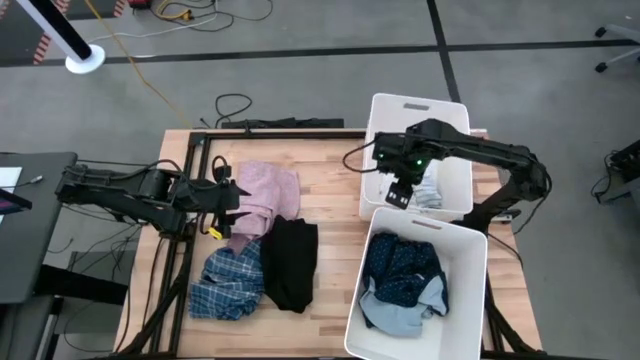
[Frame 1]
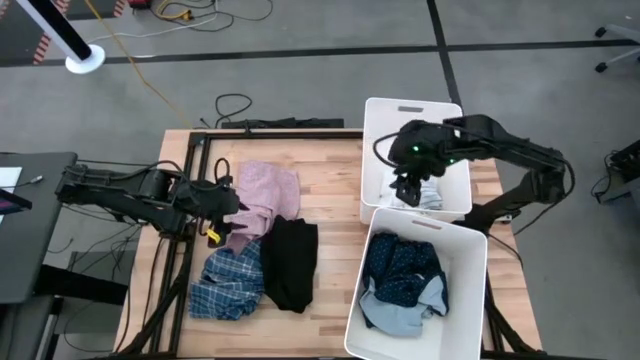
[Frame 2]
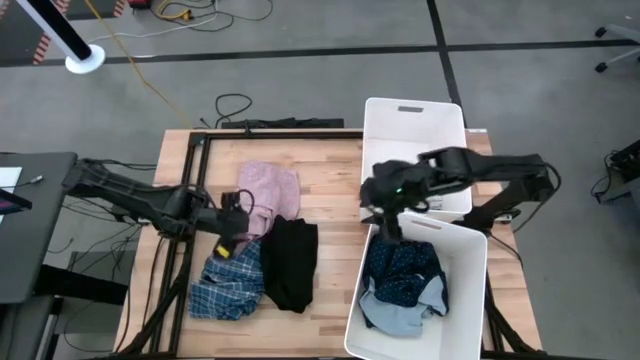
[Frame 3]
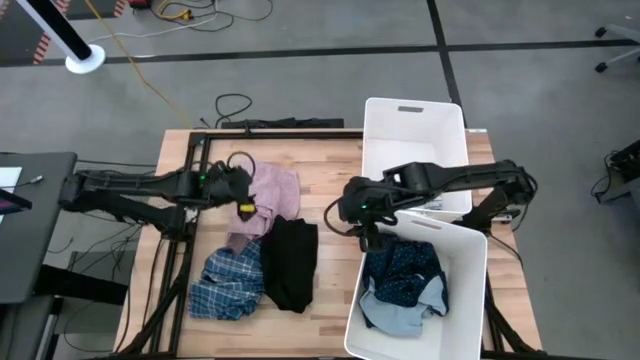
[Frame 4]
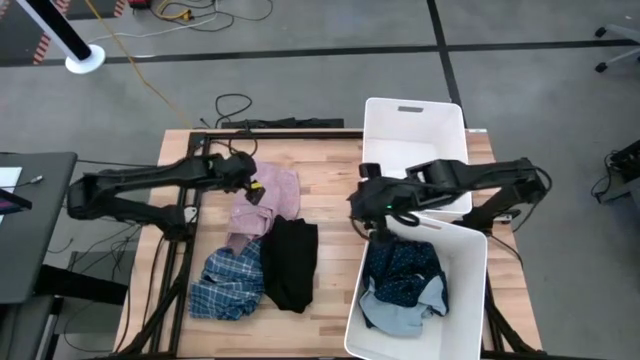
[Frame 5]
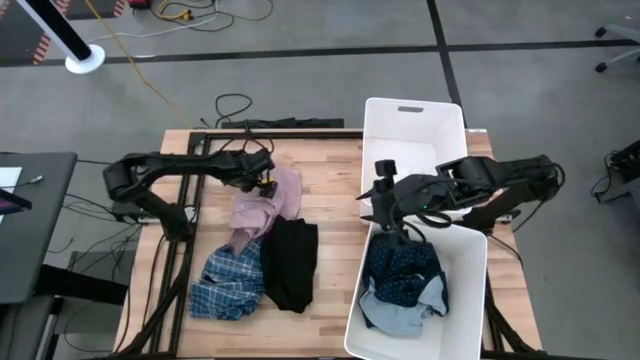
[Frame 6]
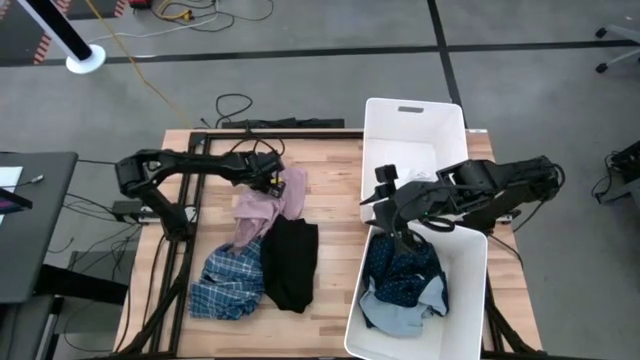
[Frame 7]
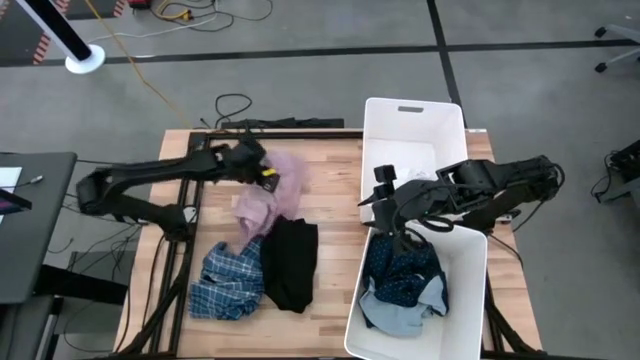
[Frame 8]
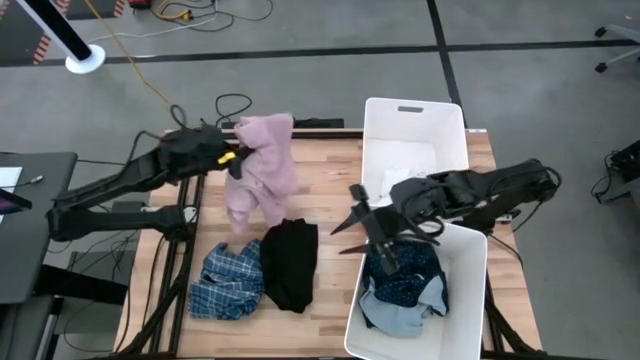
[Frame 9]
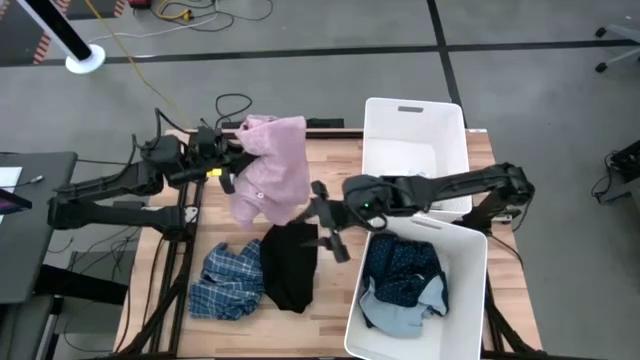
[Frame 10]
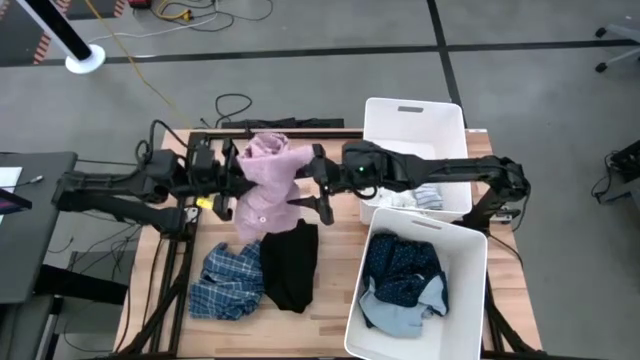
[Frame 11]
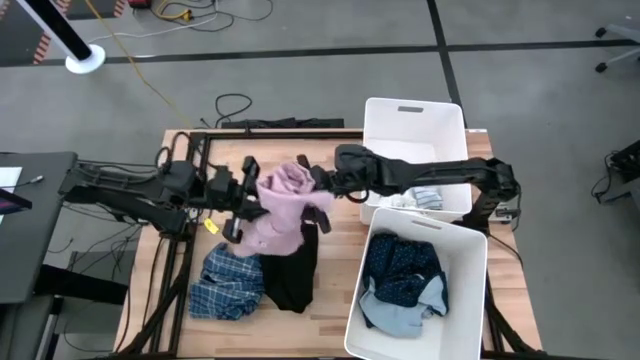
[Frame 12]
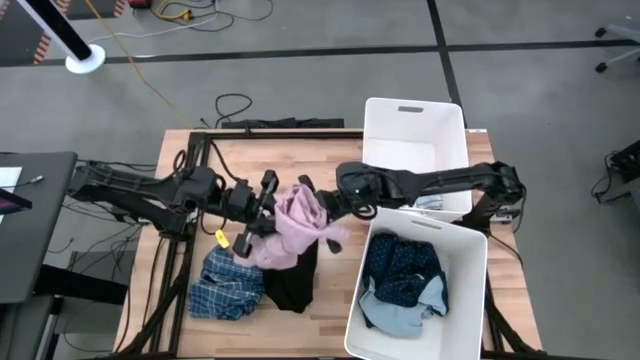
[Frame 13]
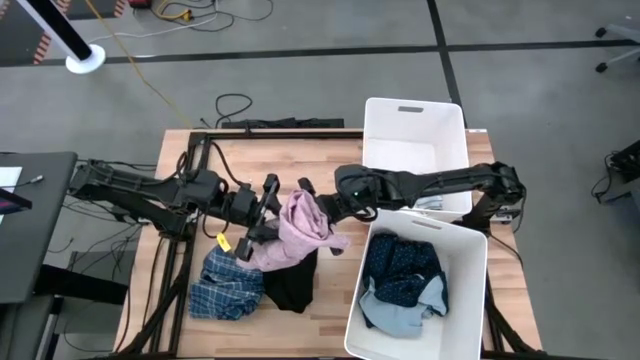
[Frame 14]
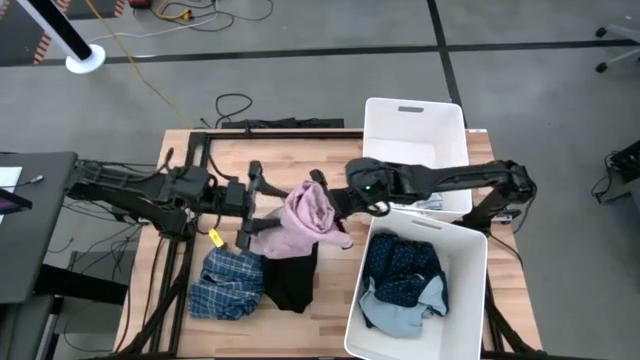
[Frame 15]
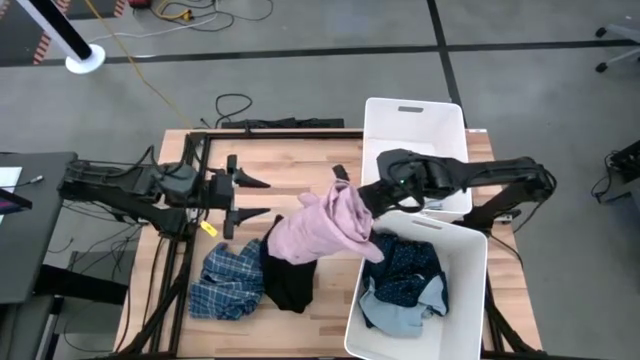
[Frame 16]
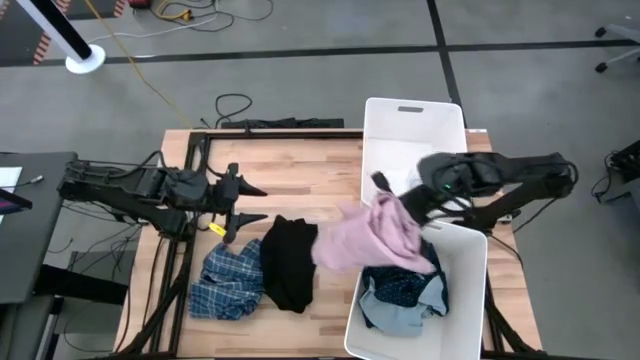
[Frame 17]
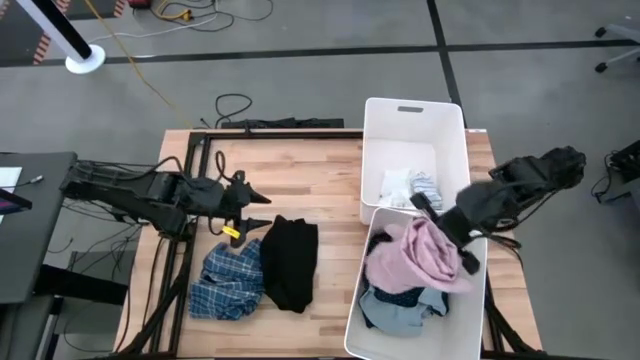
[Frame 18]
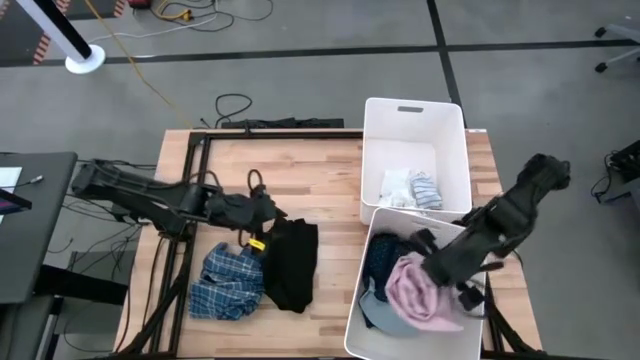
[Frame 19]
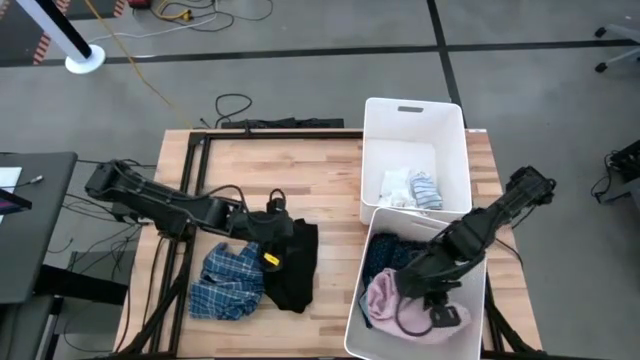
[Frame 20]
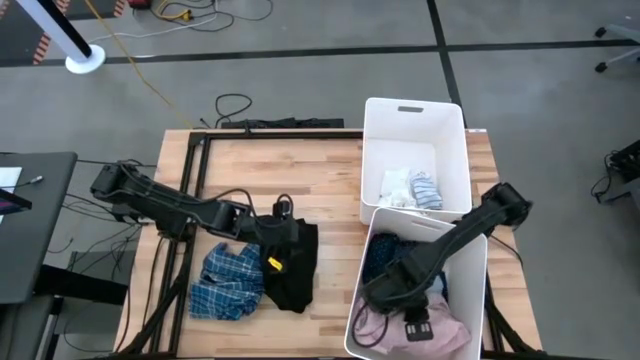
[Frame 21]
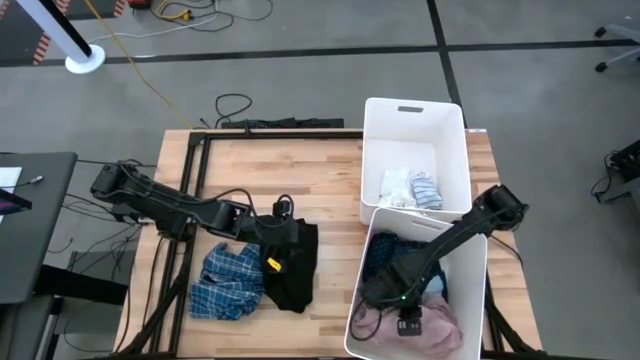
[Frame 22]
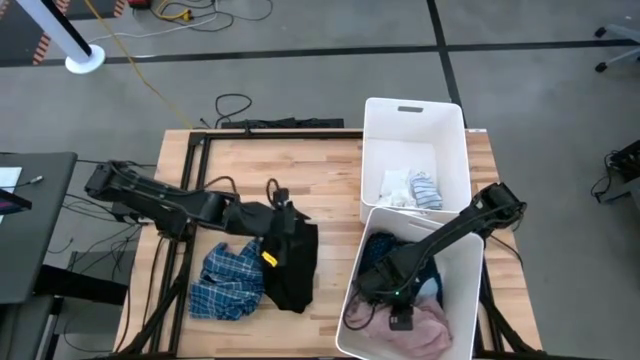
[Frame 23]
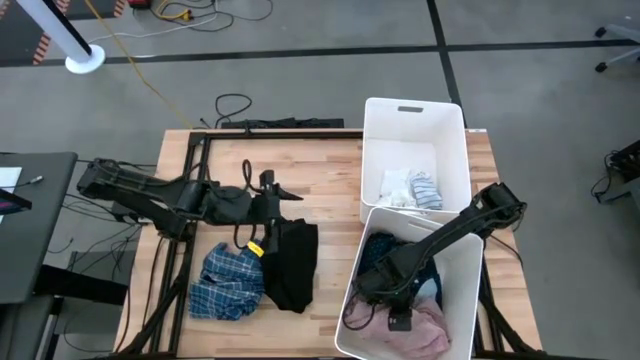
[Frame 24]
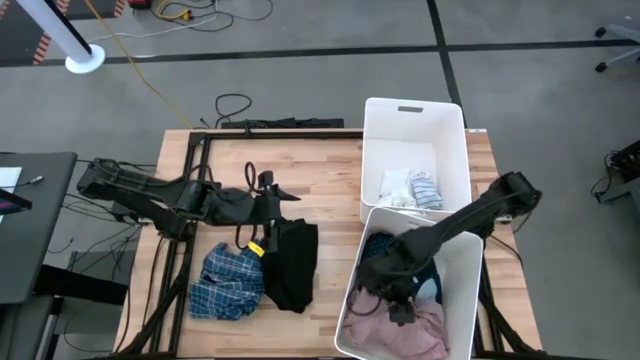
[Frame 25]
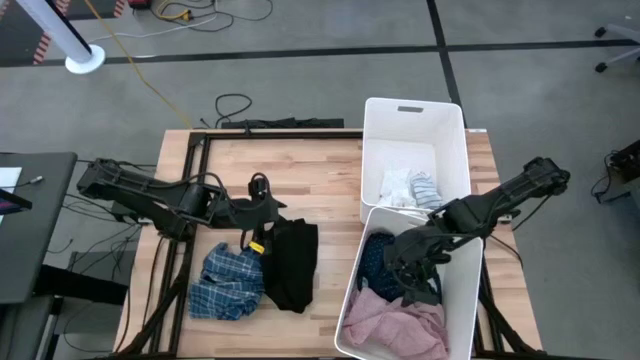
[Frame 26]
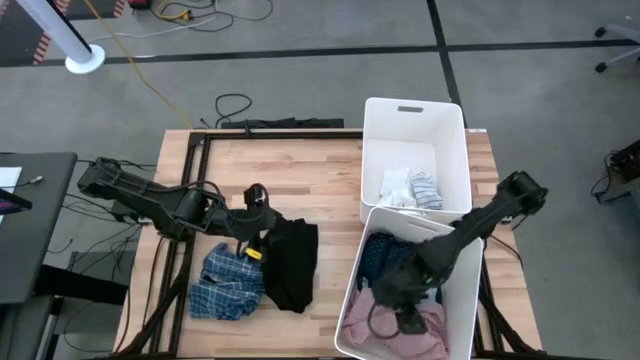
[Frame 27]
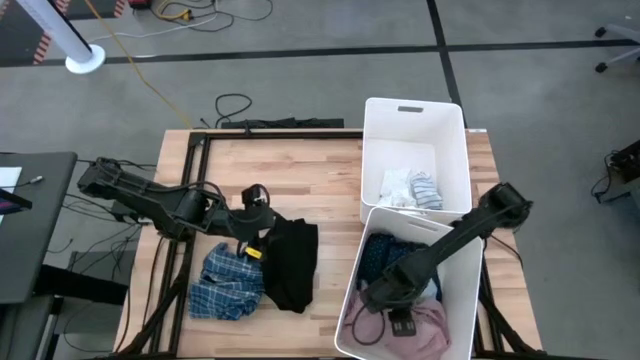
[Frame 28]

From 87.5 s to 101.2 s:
Task: Sort clothes
Put the pink polo in the bottom laundry bin

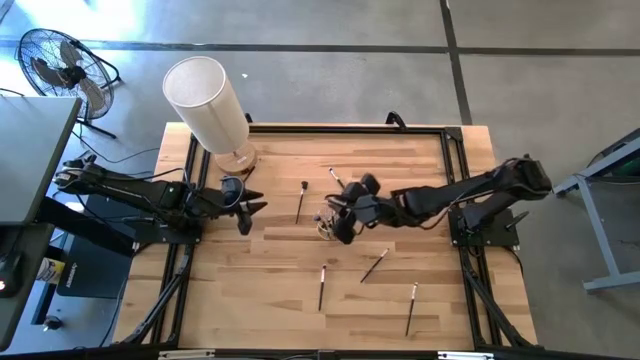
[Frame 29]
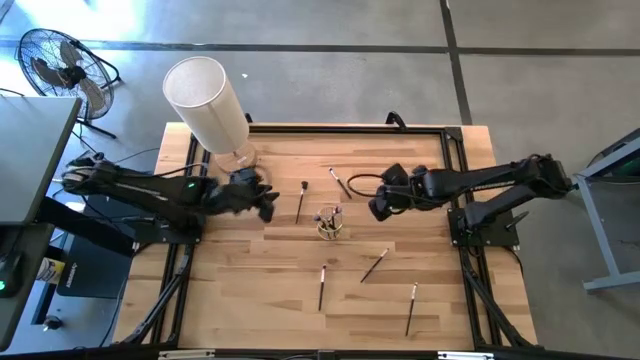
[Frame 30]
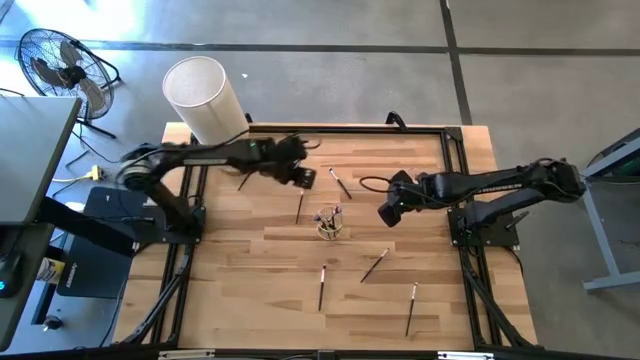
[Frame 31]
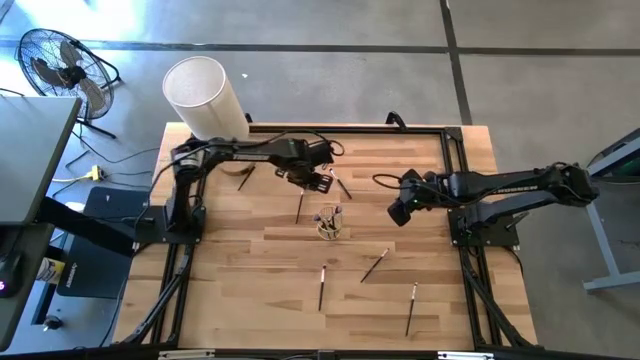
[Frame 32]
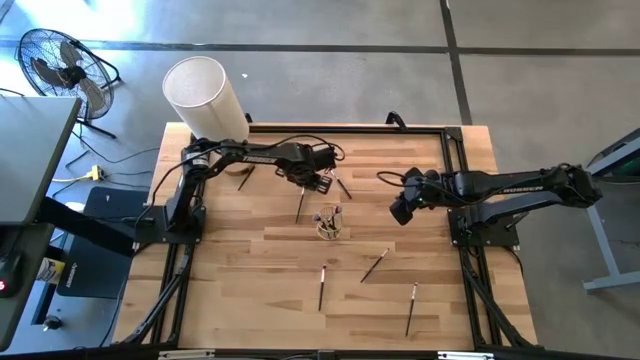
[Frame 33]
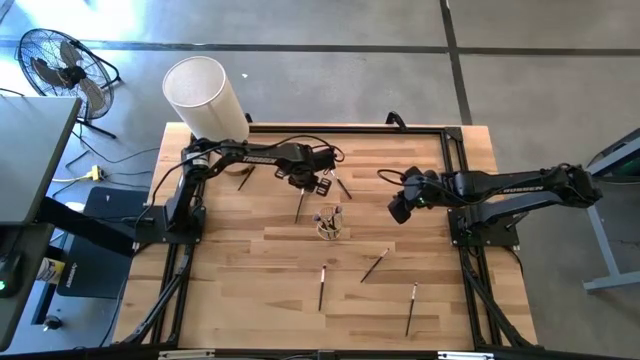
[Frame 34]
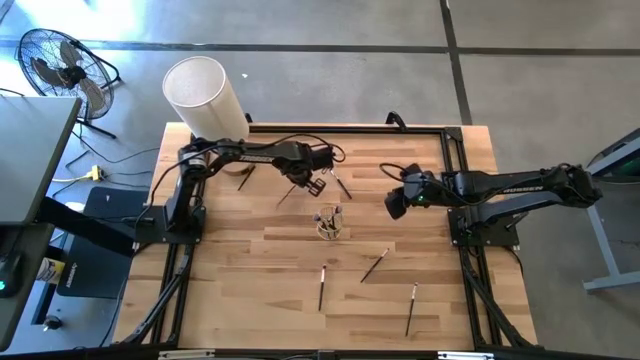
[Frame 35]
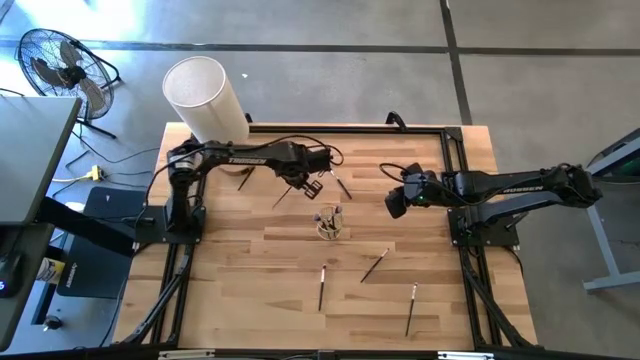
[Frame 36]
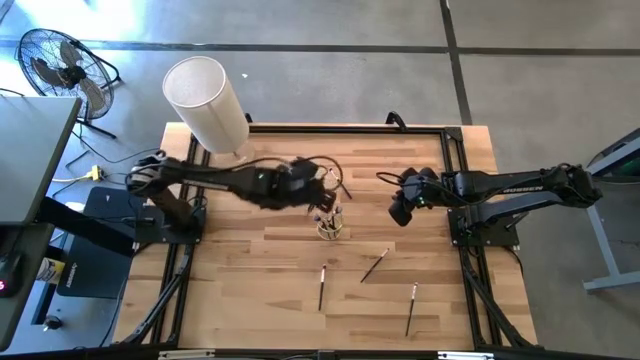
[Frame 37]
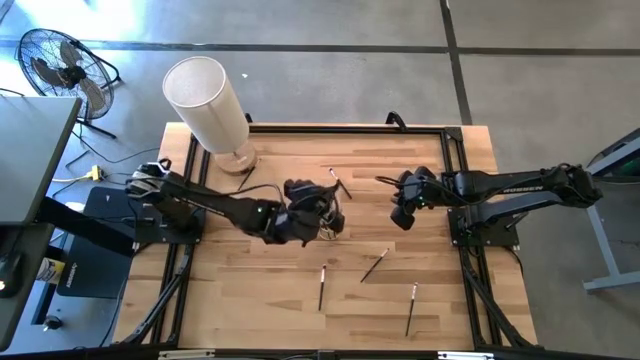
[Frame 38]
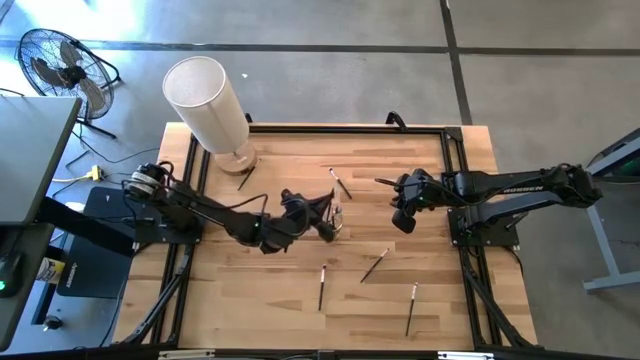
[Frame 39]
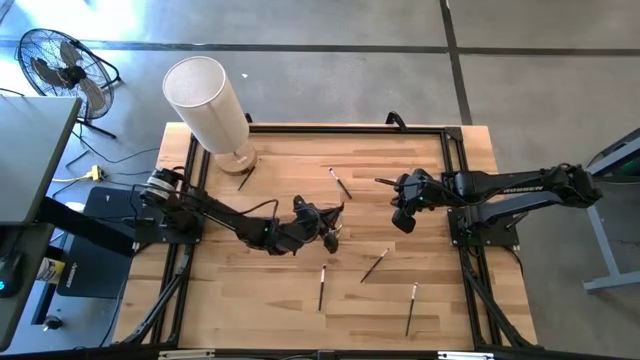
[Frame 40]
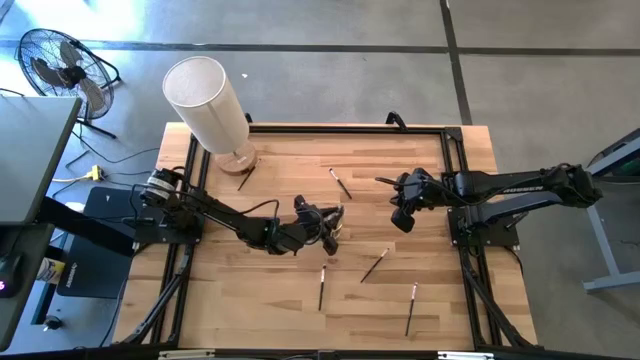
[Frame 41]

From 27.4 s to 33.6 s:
Task: Put items in baskets/containers
Put the lash brush into the wire organizer
